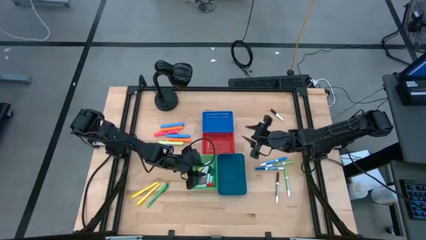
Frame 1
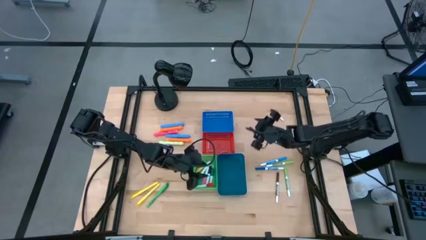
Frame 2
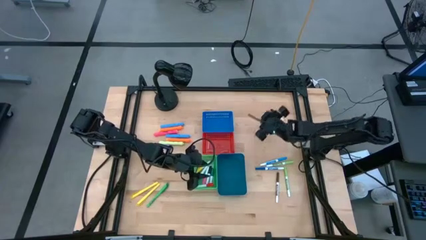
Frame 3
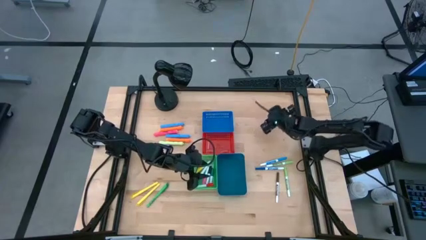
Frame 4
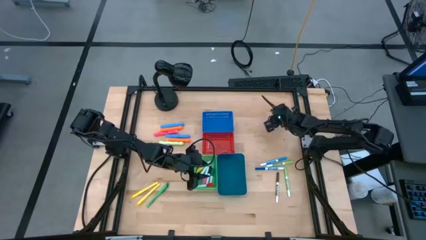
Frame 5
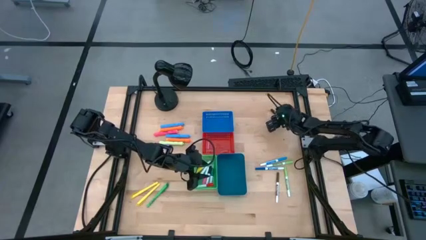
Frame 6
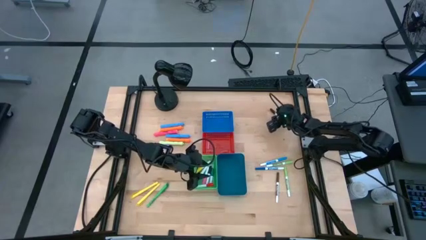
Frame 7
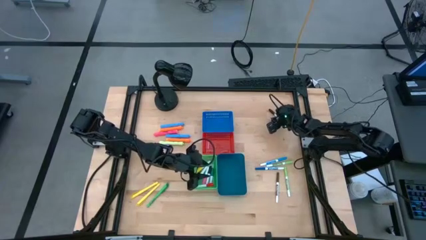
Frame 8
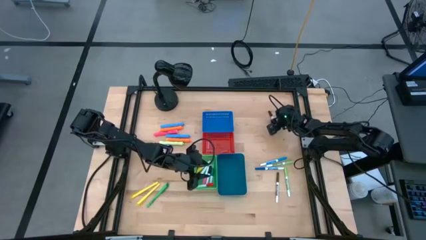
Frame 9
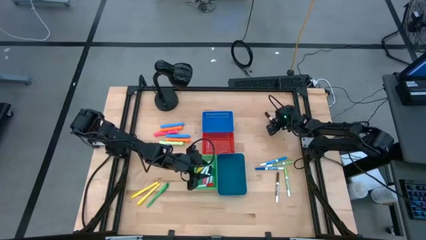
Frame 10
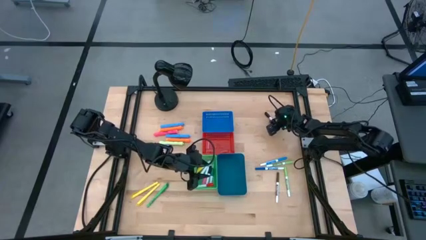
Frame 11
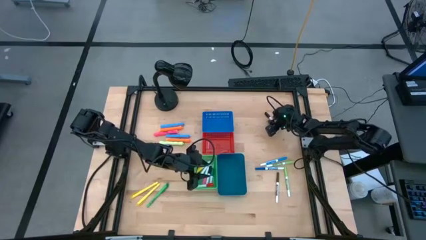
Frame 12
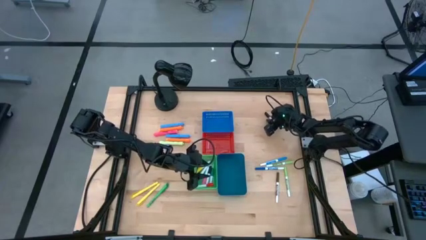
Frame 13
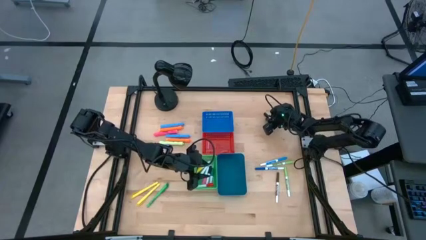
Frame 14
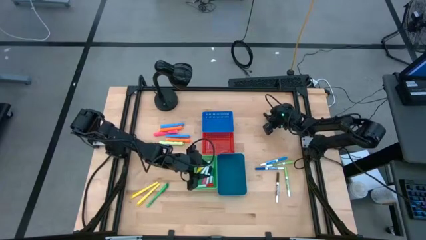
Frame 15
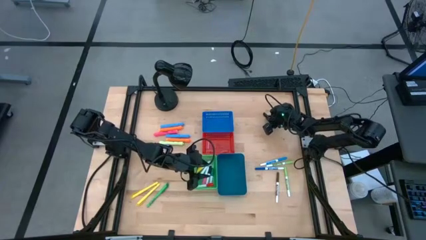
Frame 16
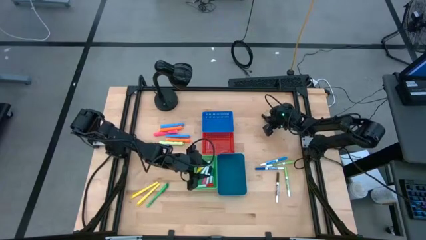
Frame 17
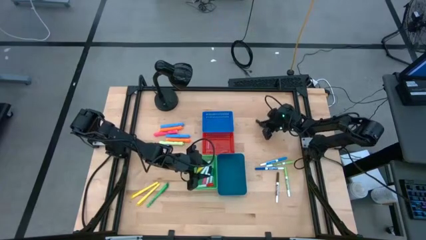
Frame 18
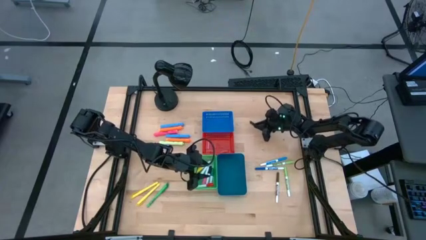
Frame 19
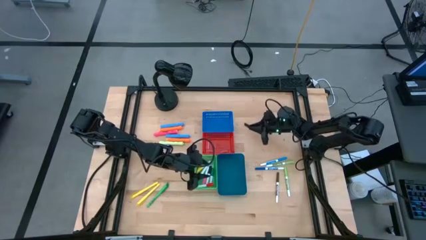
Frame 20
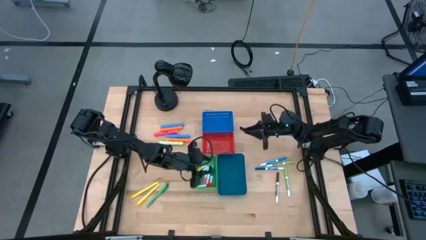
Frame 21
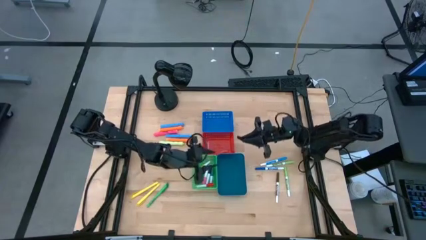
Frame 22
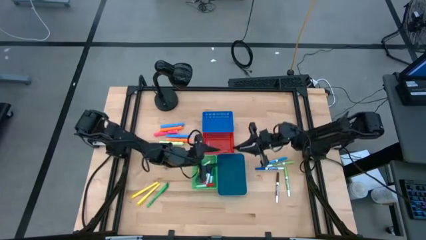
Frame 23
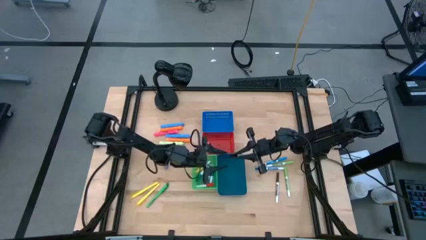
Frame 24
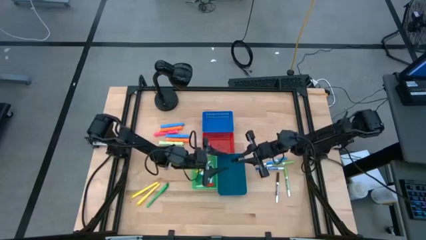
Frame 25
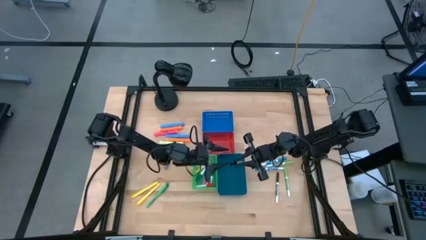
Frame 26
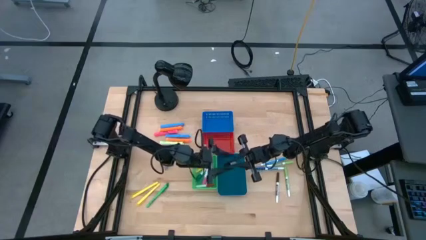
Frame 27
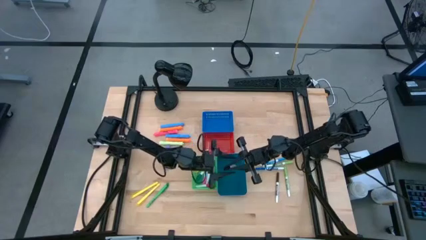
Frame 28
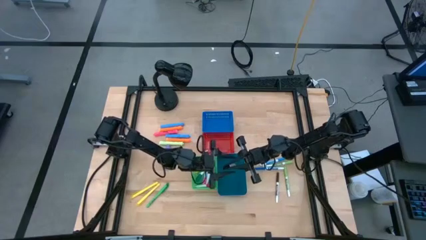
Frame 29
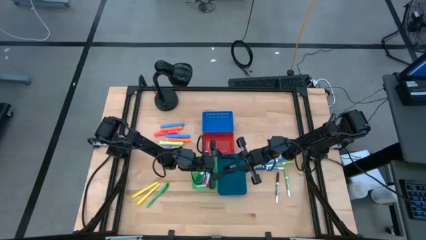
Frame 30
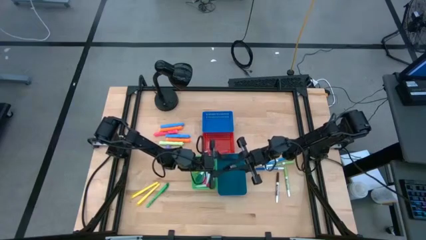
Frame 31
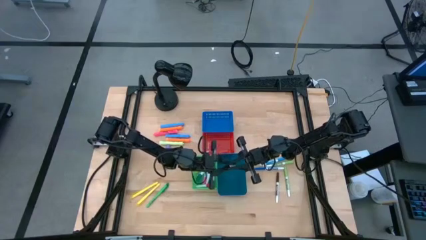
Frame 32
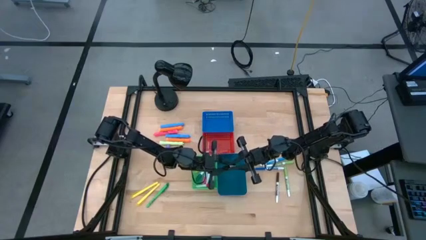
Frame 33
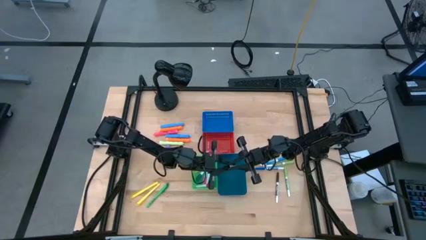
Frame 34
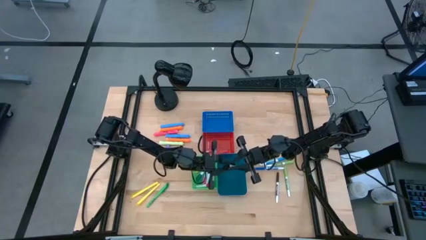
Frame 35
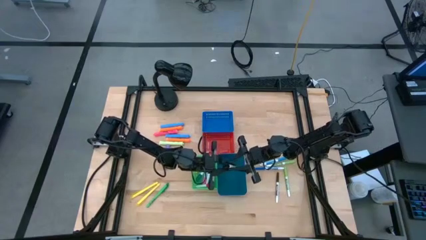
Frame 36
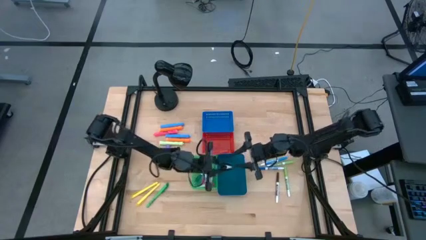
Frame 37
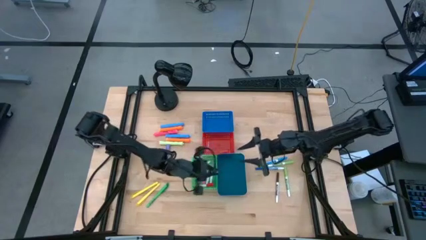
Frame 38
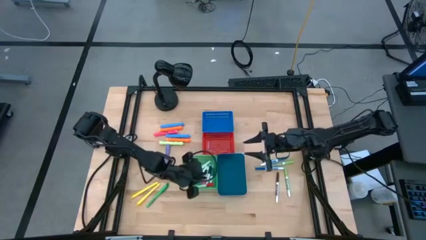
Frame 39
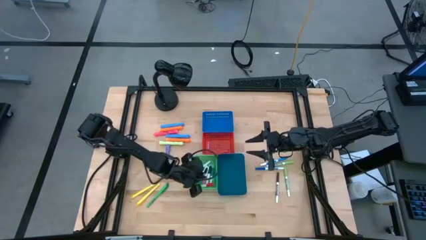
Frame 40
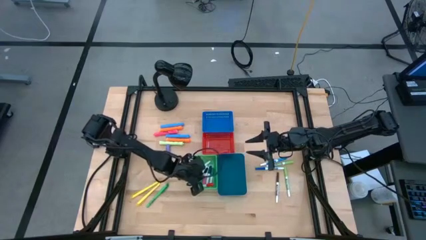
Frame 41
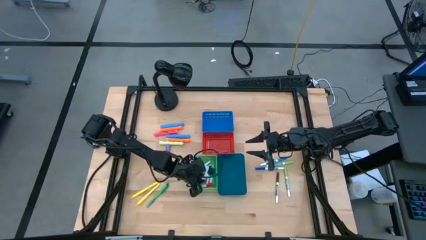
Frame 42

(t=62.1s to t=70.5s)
Task: Pick & Place Markers
Put the small black highlighter pen into the green bin

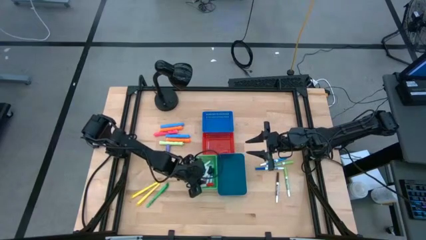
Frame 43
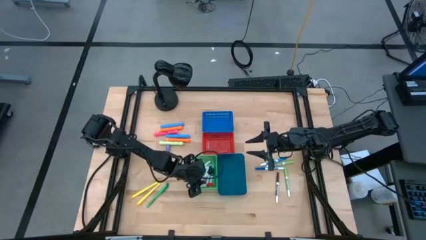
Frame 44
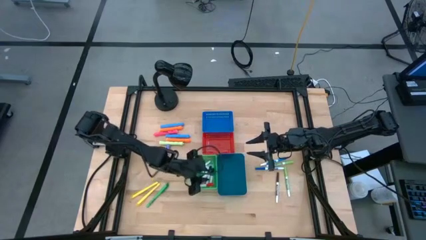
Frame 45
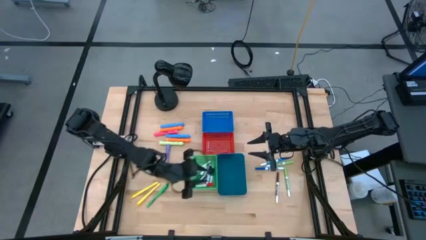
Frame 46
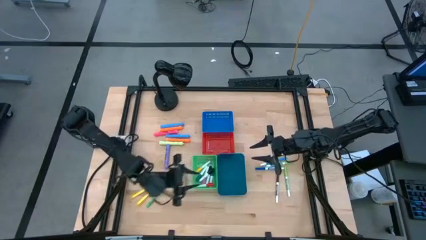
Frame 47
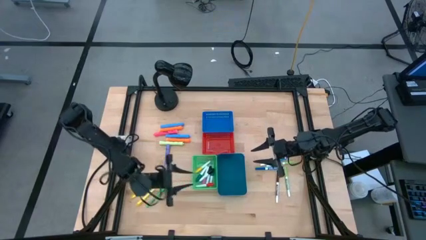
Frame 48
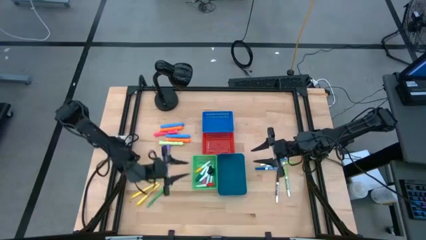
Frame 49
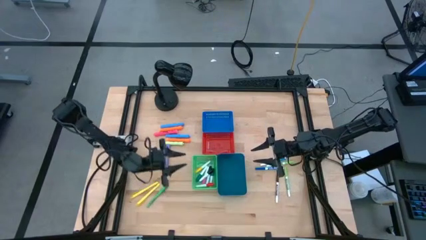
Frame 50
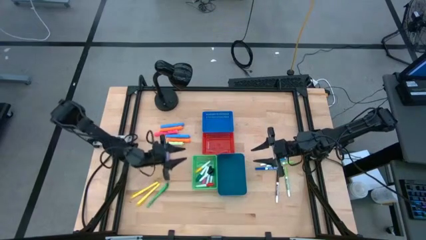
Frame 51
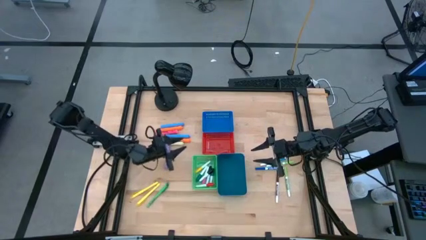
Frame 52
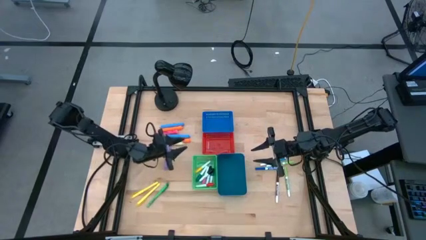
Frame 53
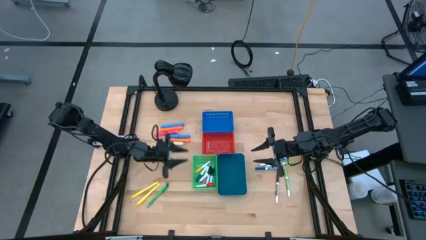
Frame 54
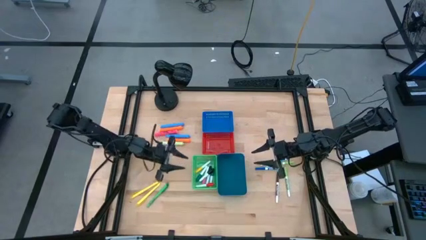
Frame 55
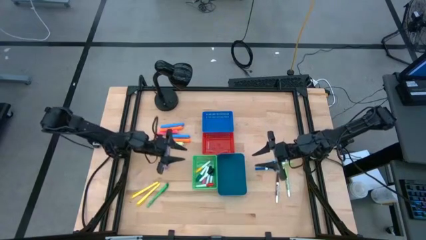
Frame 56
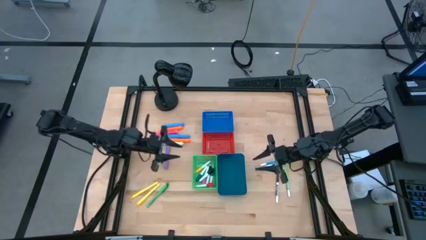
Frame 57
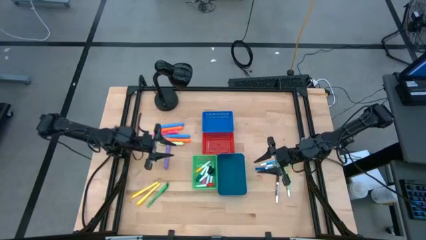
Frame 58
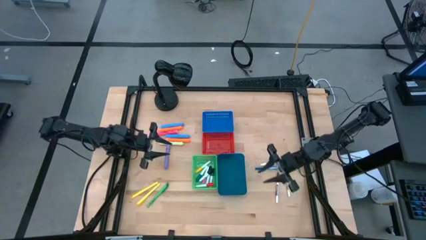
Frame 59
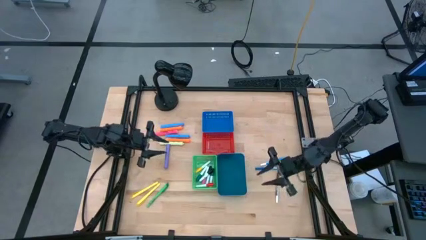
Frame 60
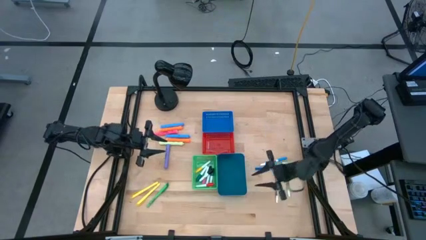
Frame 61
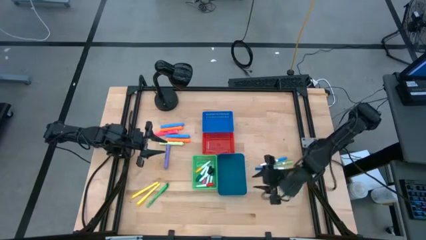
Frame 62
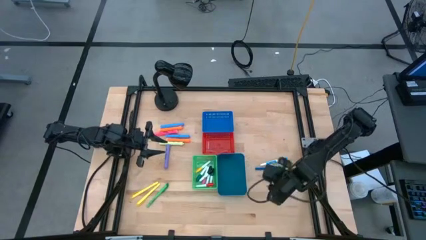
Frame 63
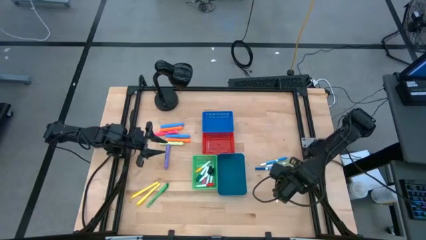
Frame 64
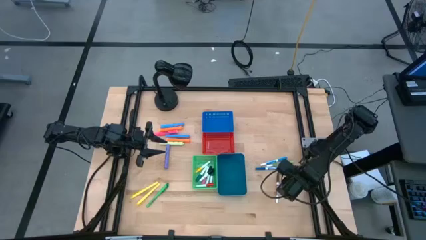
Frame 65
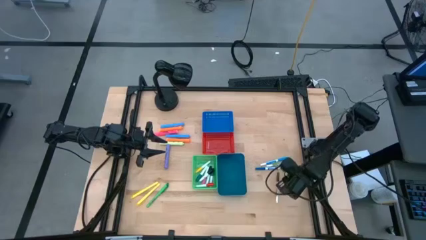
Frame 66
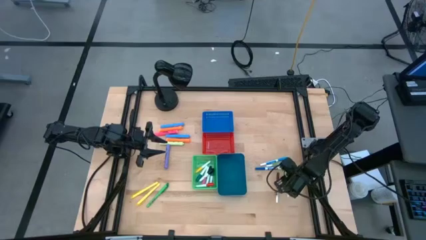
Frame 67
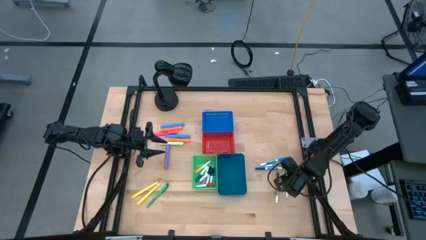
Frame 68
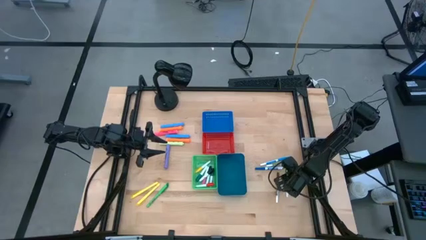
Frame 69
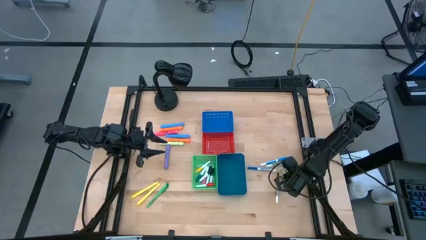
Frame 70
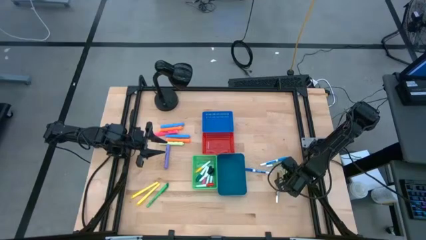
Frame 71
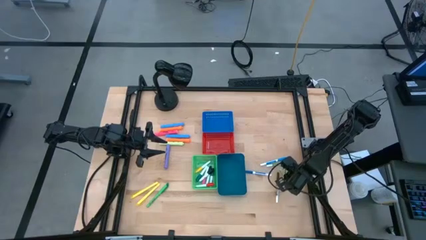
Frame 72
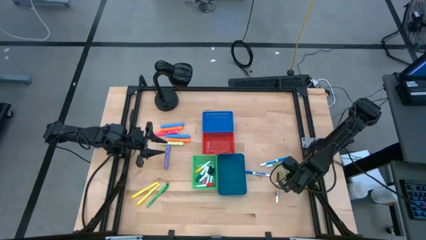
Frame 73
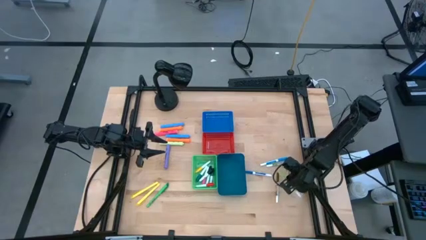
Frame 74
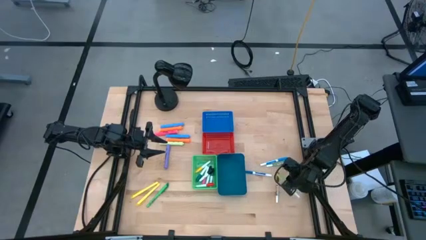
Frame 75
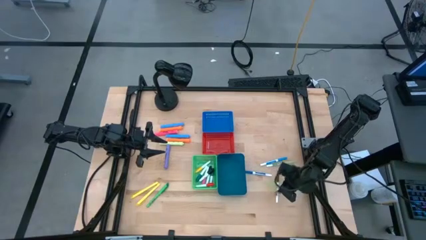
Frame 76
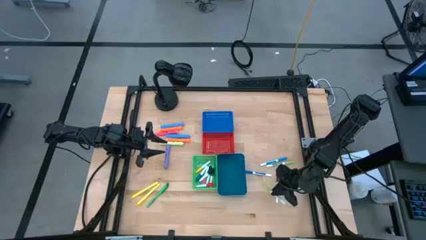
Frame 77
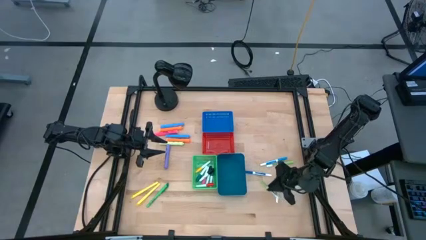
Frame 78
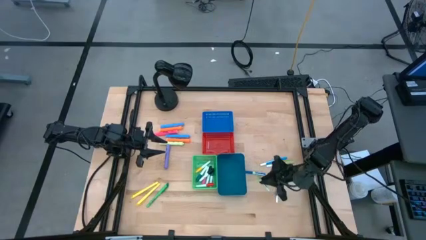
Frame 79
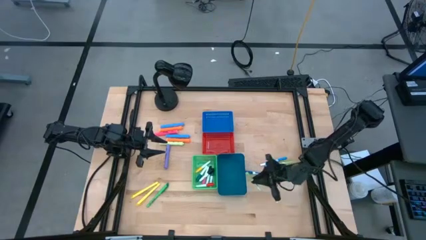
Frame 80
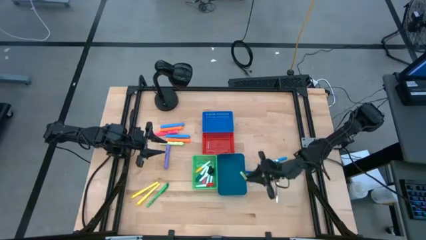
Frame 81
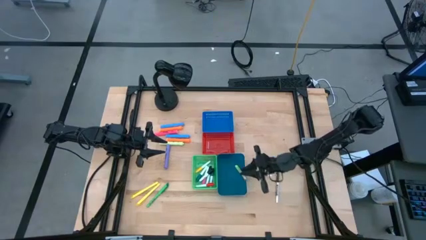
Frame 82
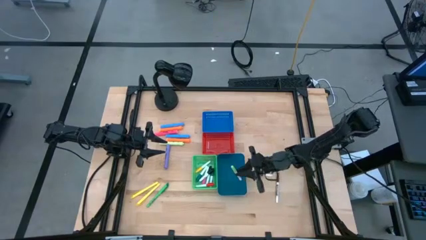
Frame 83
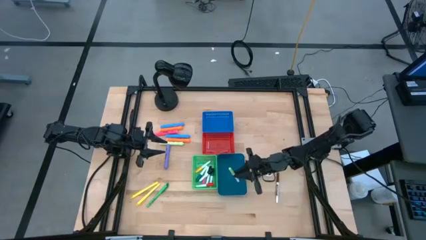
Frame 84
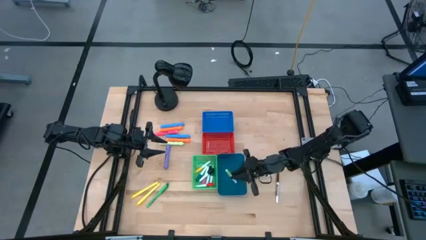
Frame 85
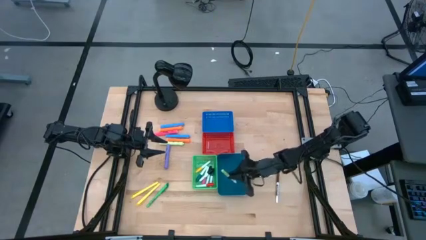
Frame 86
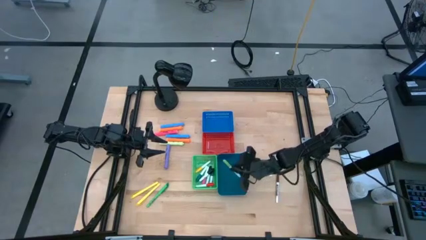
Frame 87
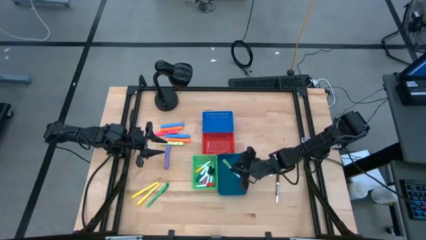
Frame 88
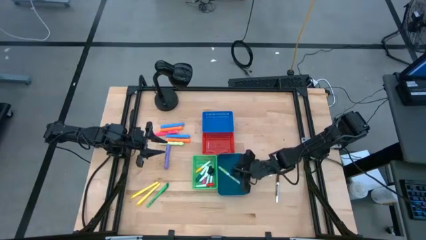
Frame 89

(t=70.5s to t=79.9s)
Put the bottom light green marker pen into the dark blue bin
